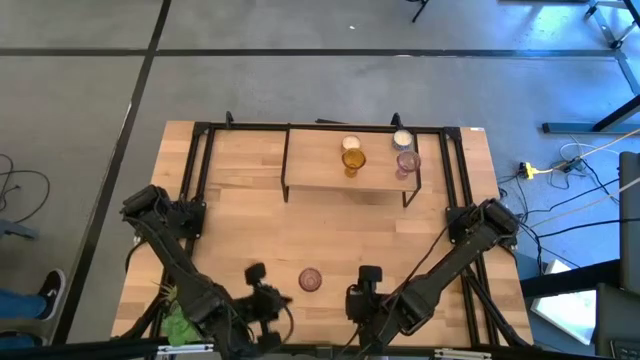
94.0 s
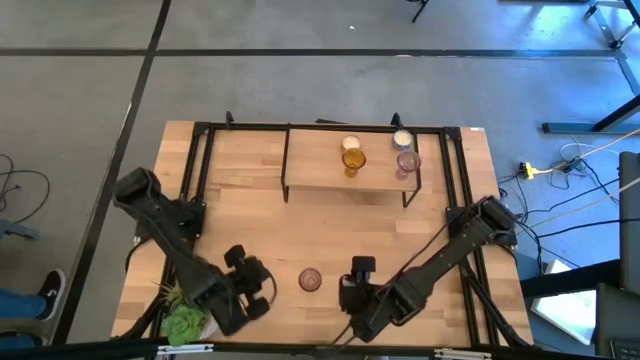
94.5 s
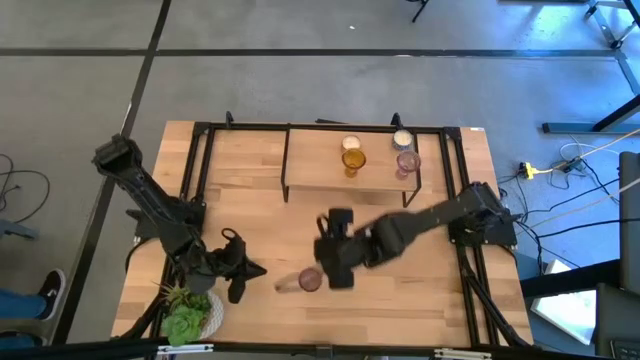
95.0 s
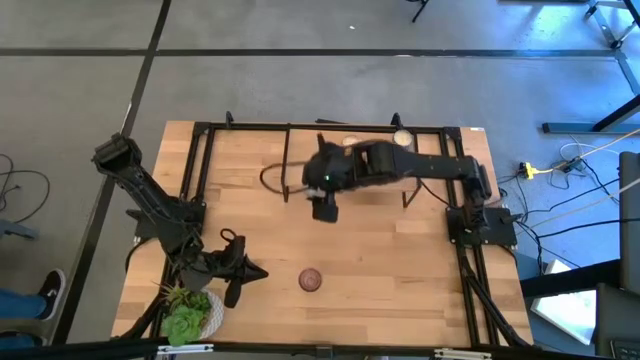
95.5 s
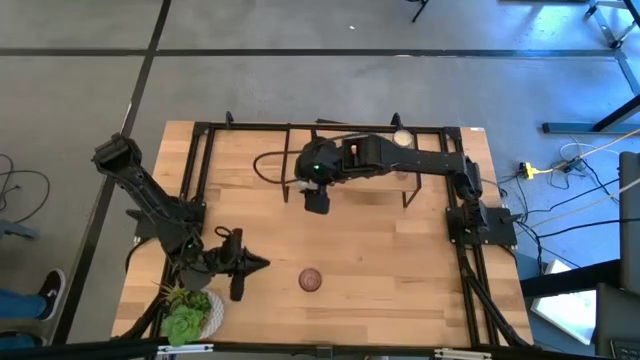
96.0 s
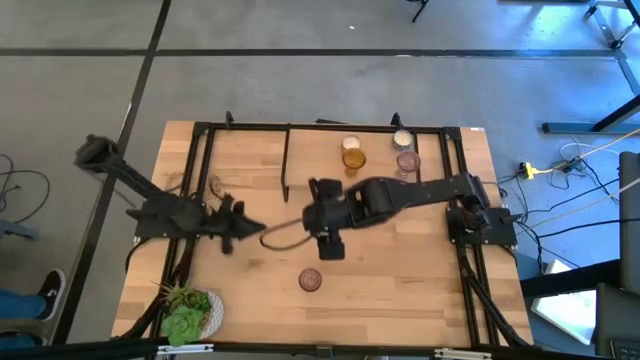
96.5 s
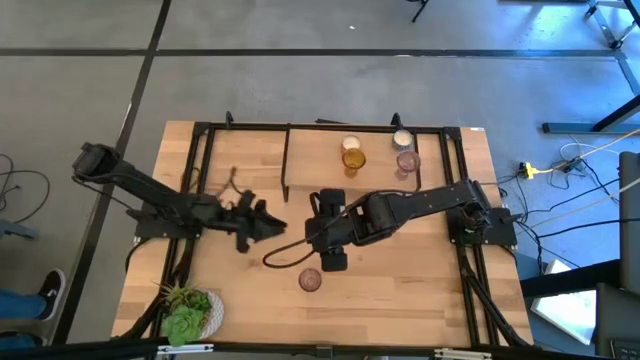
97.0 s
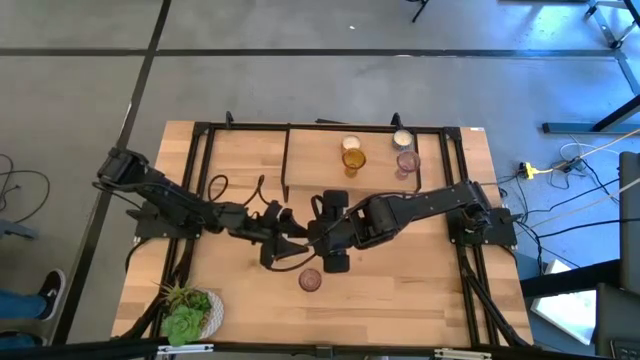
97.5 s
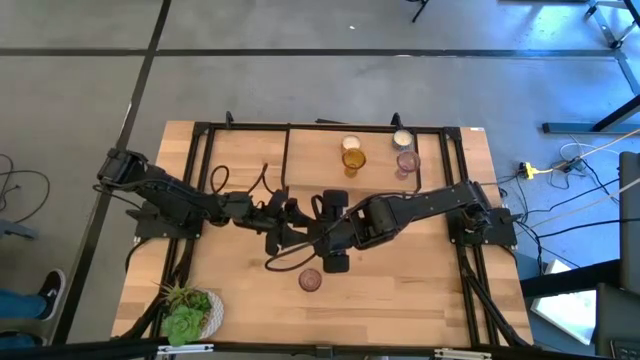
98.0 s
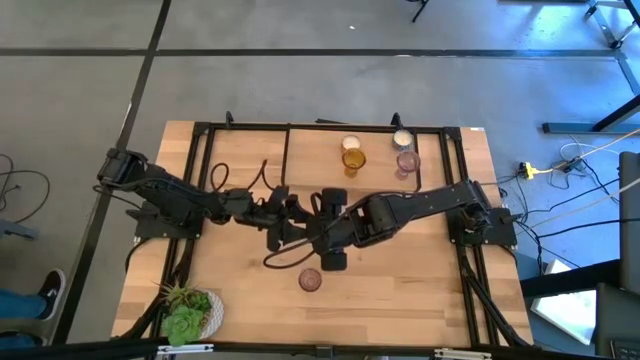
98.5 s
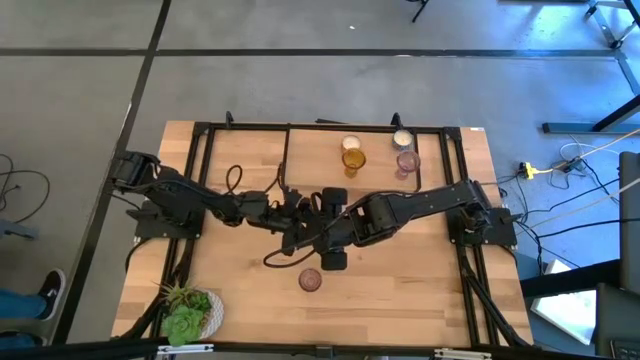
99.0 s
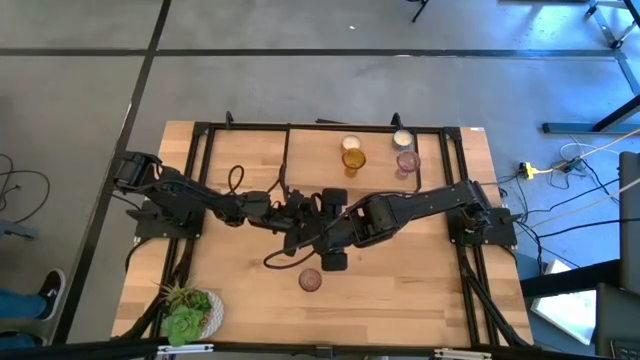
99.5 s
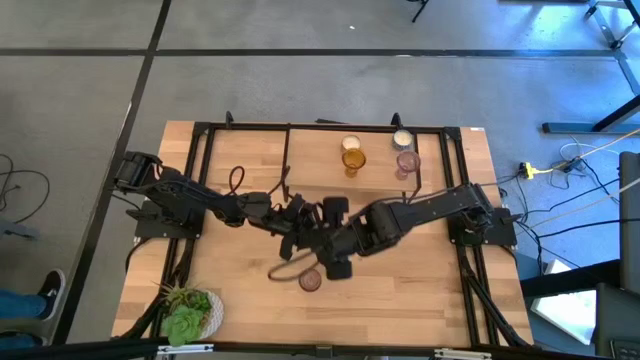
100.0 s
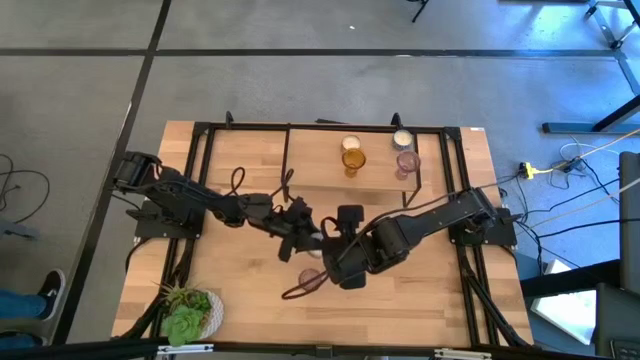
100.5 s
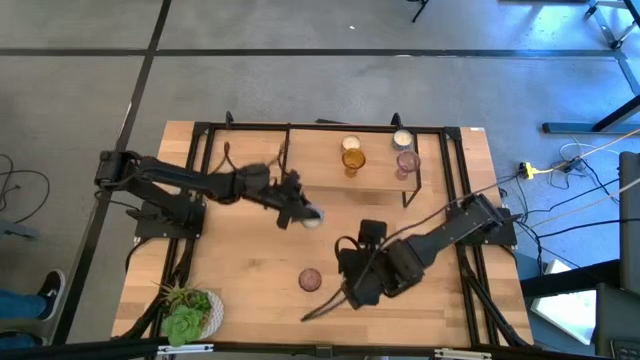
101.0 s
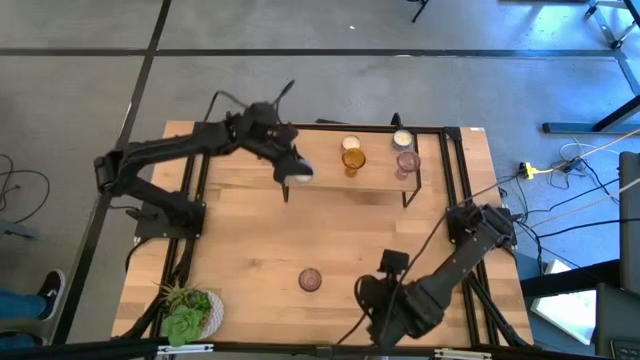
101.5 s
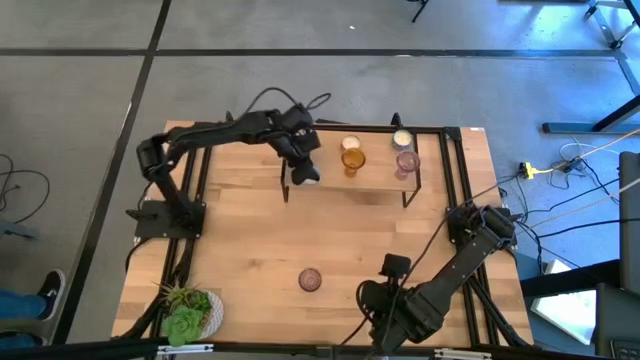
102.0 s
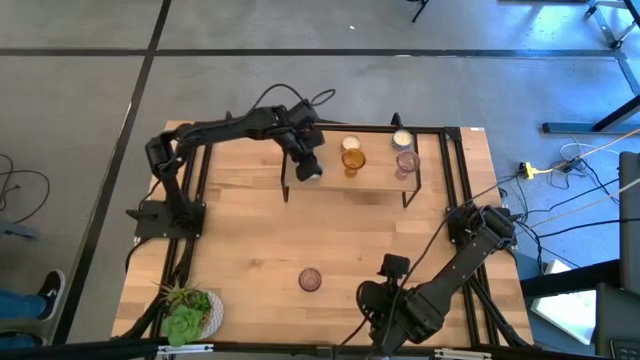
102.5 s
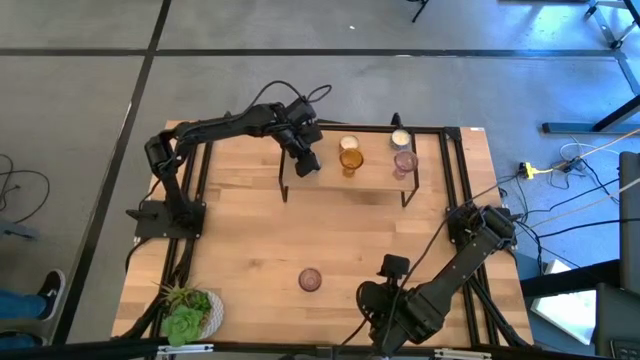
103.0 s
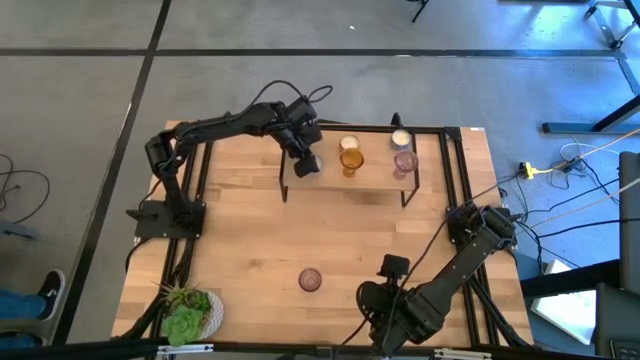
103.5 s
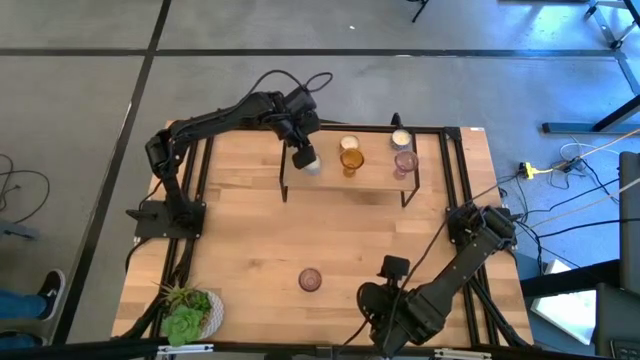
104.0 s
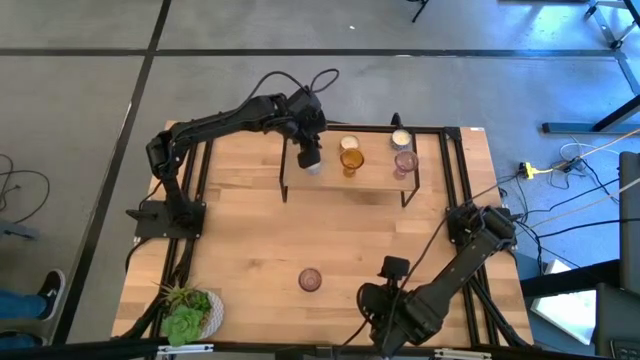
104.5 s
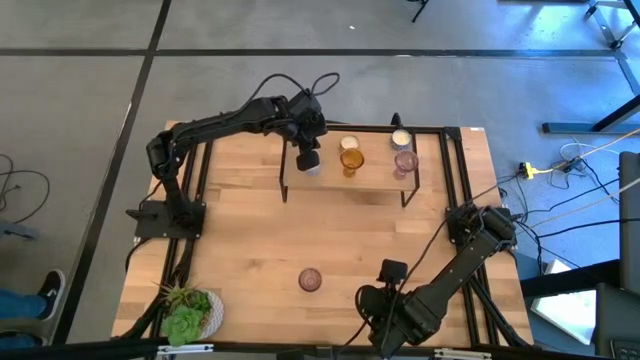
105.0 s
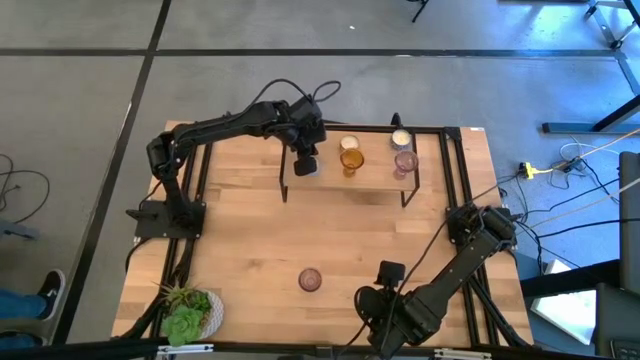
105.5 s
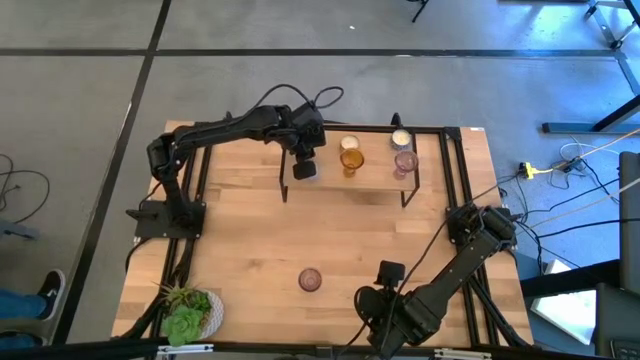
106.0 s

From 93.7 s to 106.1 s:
Task: Pick & Place candle stick holders
Put the light blue candle on the shelf
